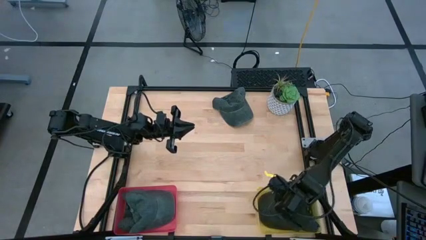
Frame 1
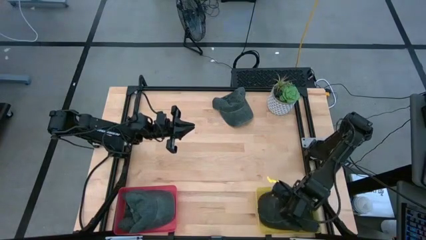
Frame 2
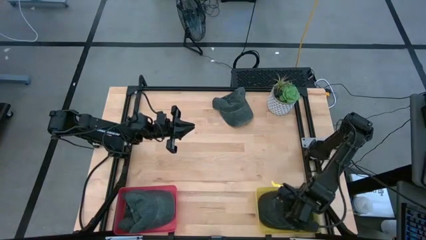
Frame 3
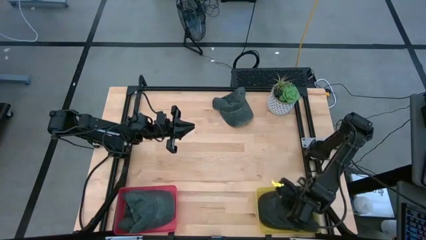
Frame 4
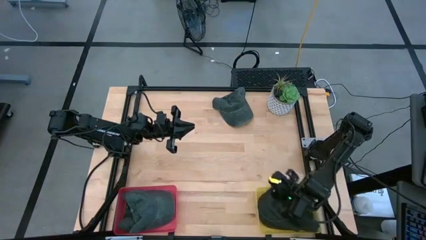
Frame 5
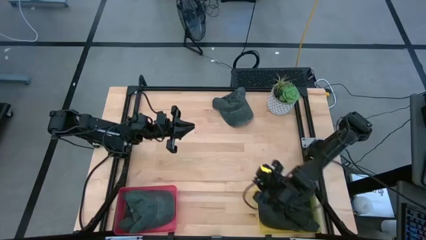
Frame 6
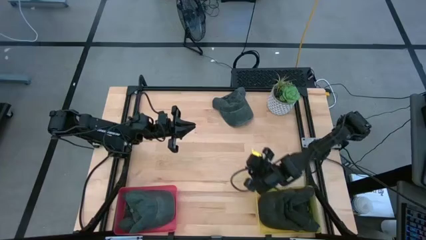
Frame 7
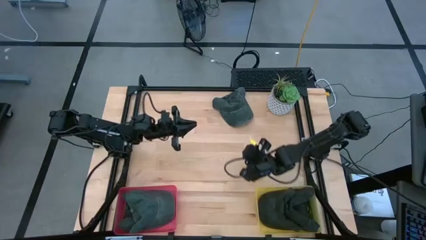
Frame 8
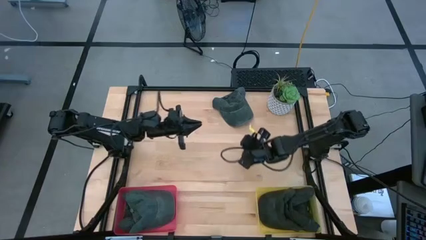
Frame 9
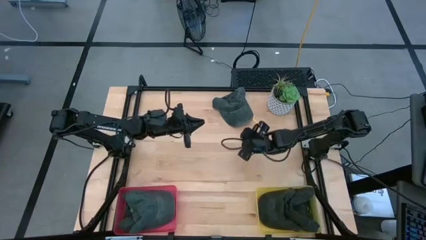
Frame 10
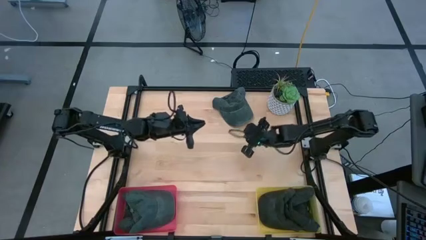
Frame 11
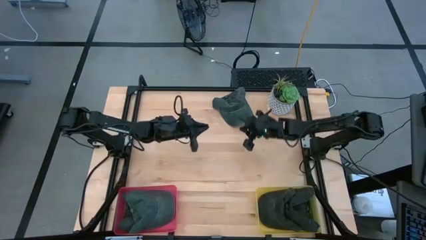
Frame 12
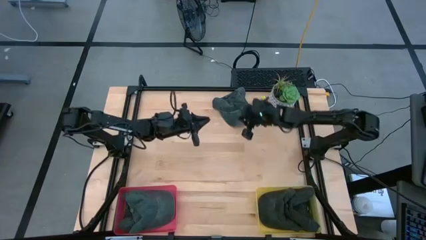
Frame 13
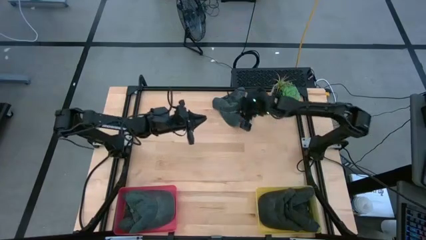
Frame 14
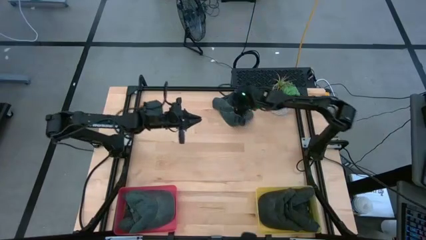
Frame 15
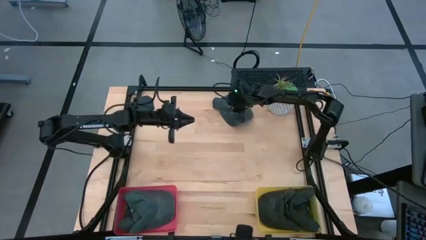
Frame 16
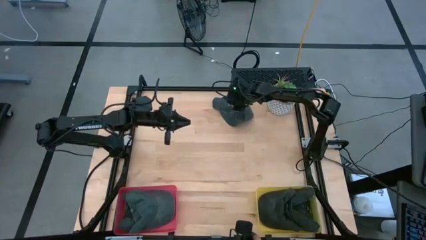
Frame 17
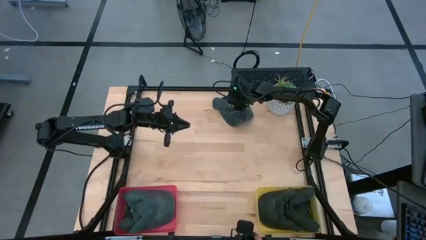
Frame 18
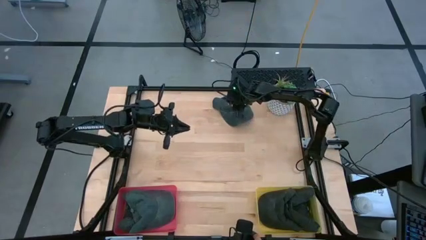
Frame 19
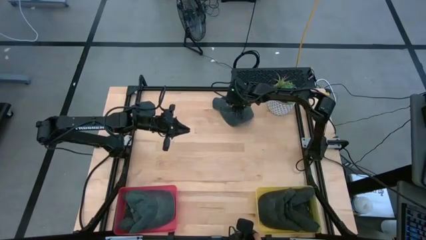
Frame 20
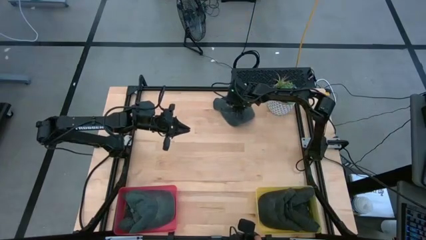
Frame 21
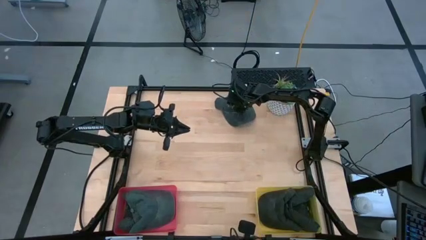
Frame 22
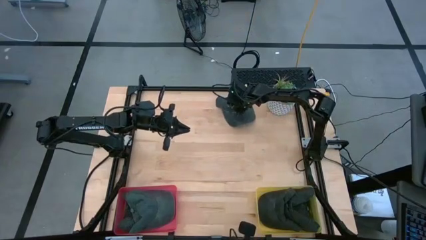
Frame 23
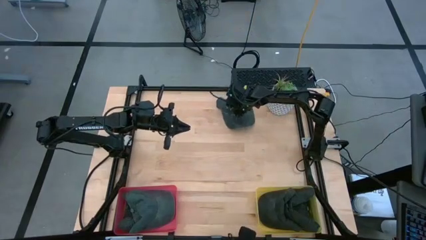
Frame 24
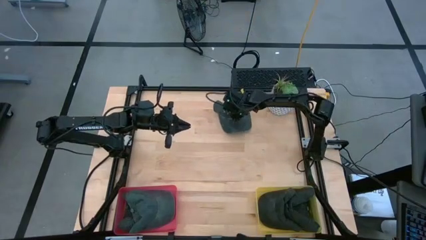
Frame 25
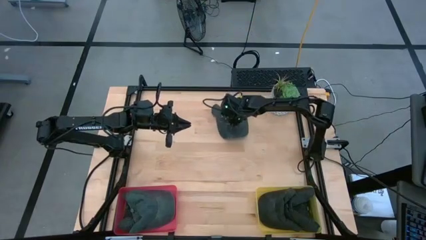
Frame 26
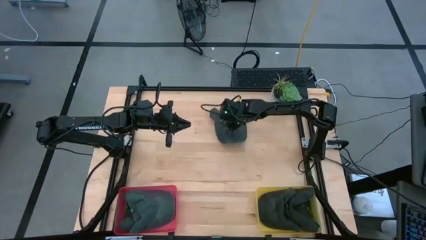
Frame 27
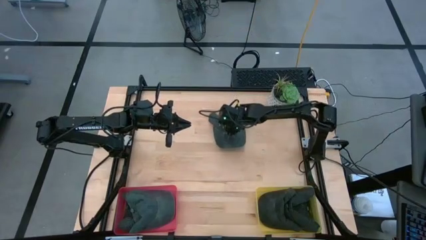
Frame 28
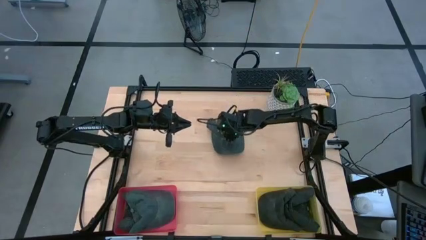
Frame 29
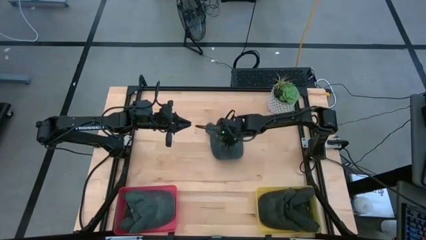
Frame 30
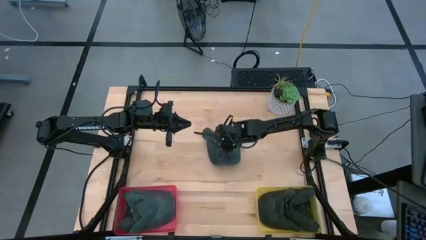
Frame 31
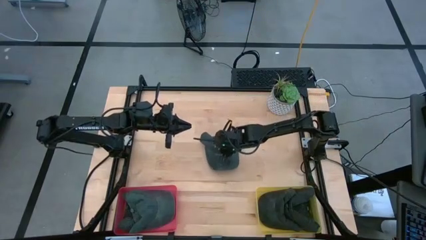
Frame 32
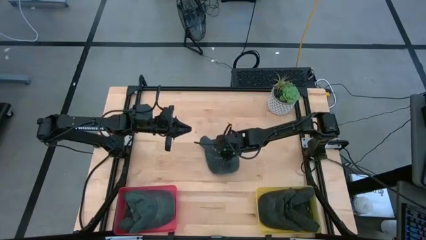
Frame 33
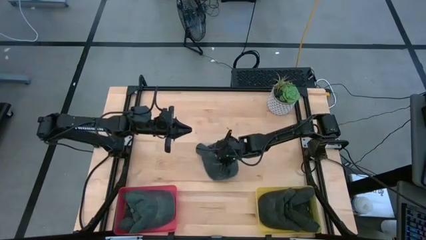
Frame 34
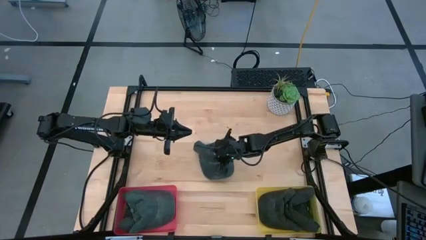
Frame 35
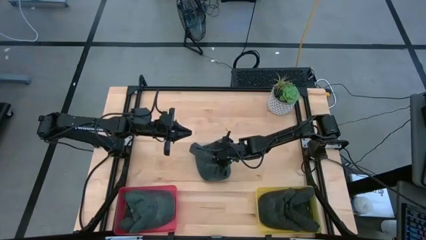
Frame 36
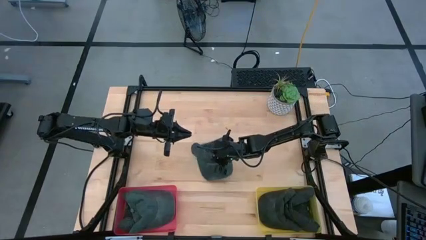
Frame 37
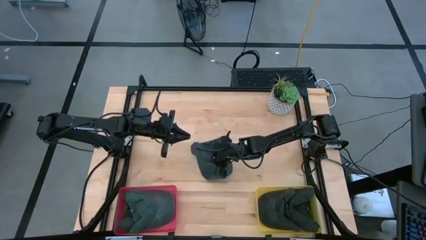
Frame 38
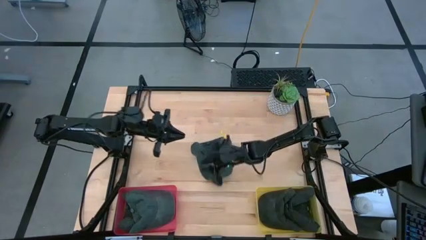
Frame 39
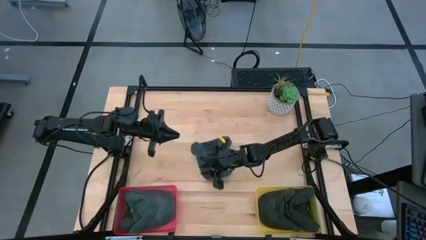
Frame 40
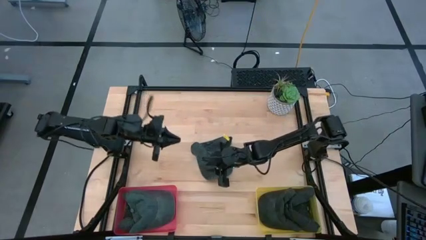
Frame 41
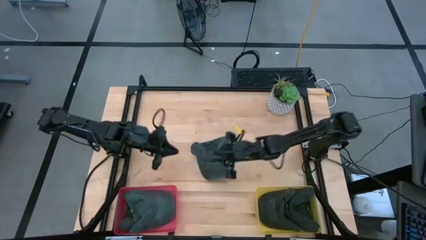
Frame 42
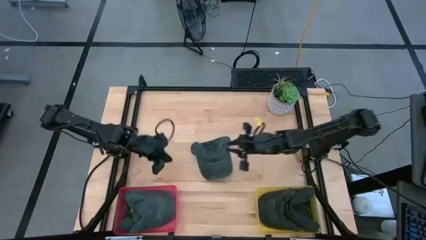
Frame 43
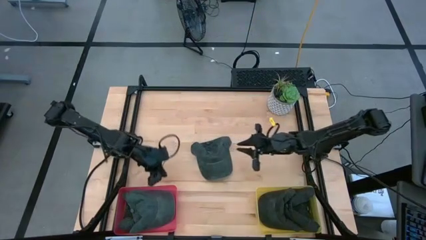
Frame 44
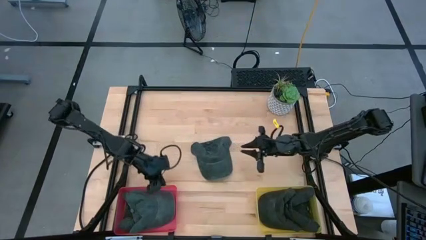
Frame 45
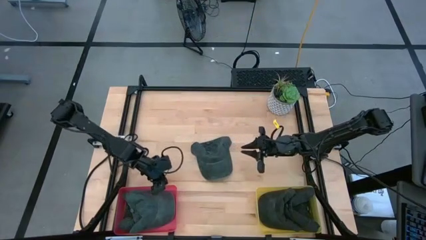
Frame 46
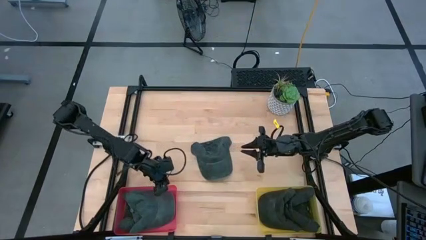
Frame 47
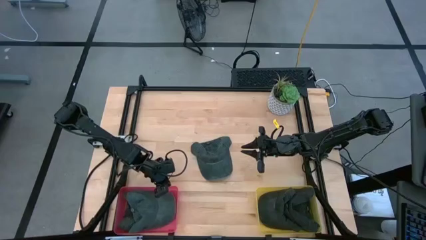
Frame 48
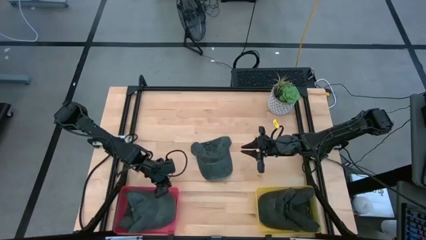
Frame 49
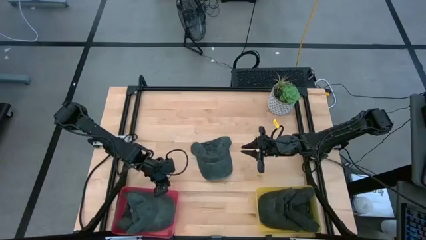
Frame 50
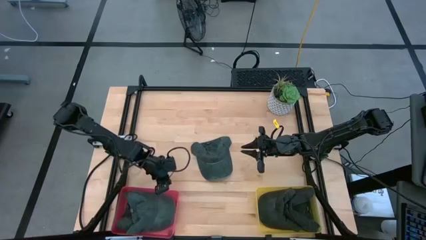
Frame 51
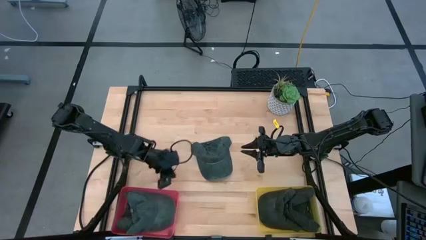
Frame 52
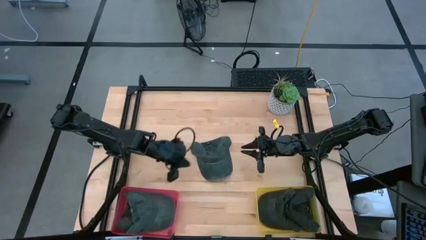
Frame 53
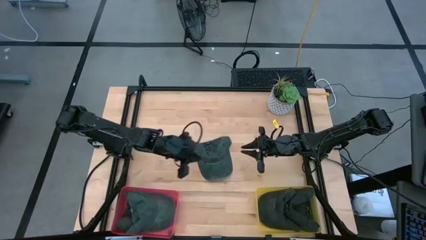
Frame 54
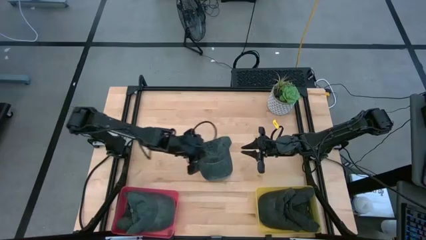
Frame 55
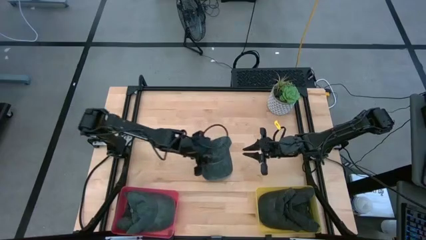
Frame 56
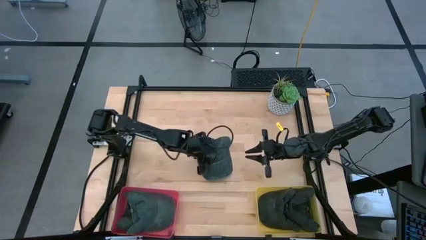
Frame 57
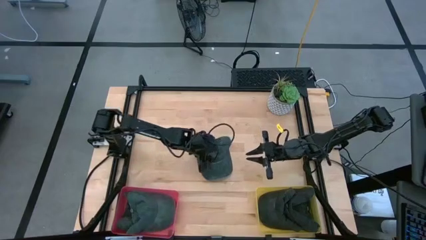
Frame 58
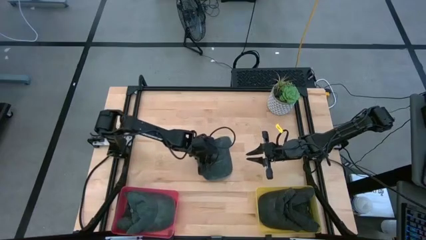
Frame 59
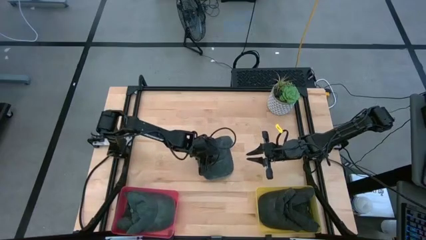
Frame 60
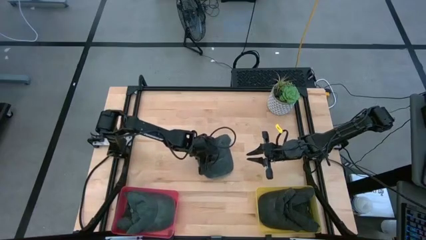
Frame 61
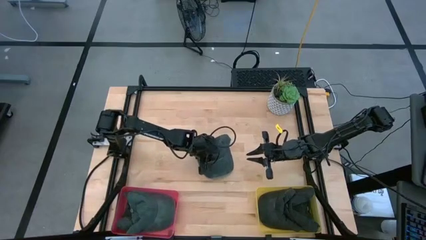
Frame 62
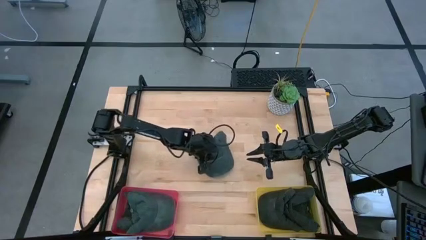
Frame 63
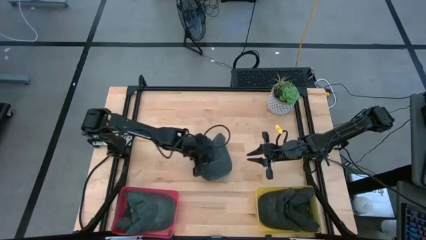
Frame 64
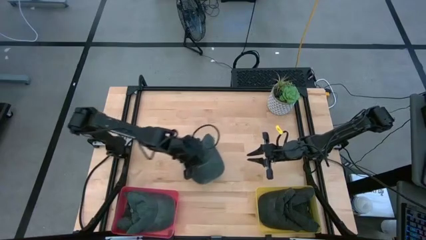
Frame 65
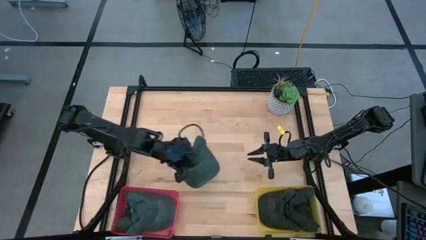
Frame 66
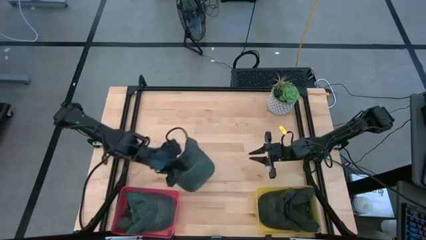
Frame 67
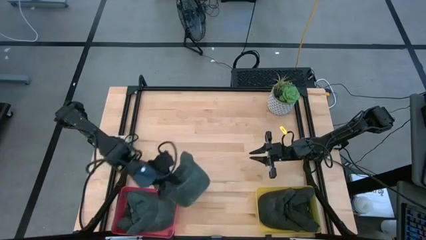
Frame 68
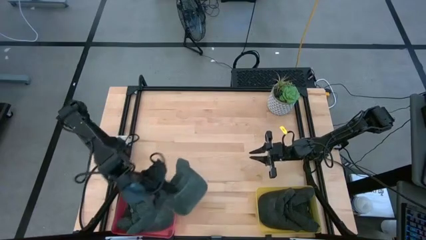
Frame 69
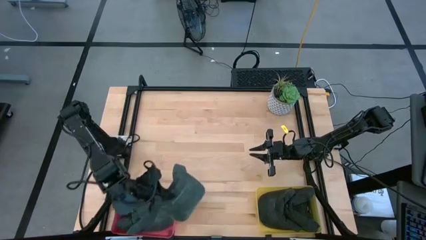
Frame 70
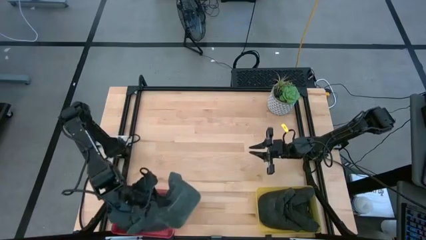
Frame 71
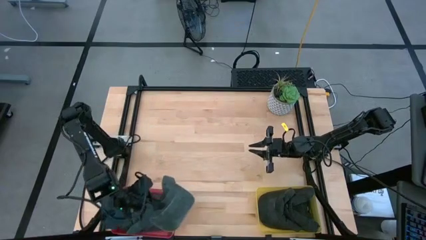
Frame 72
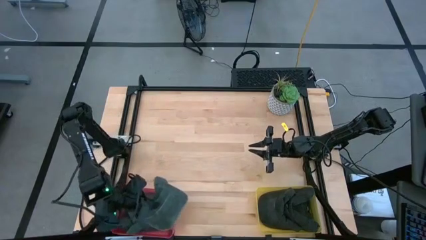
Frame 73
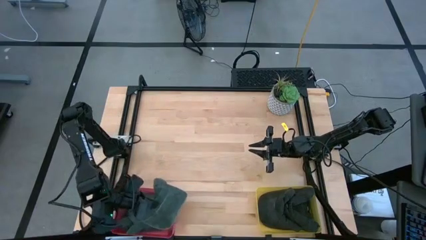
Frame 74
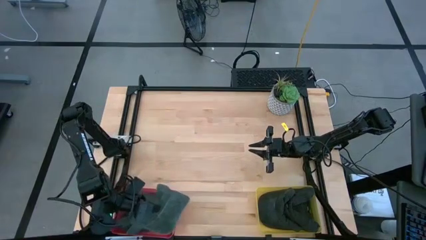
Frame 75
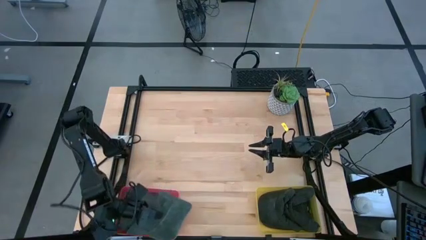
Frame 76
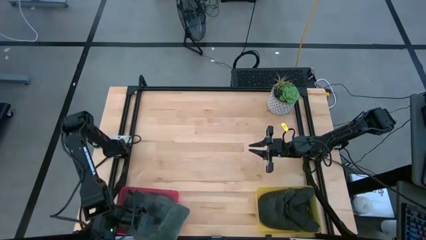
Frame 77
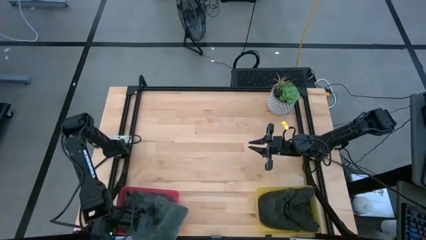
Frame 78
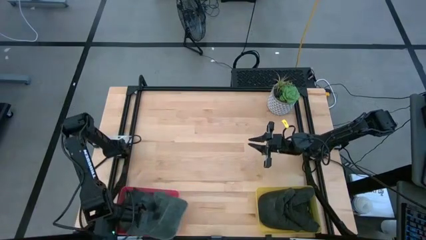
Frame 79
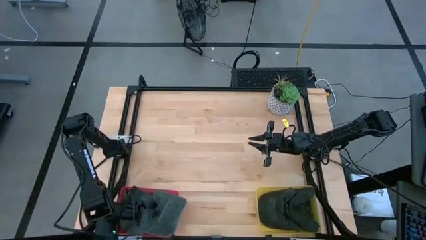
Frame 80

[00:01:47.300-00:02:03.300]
Task: Pick & Place hat
Put the grey cap into the pink bin

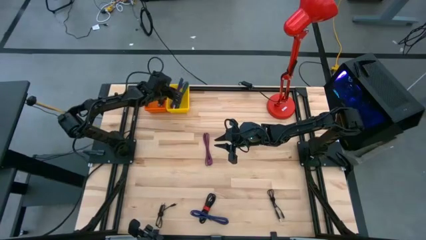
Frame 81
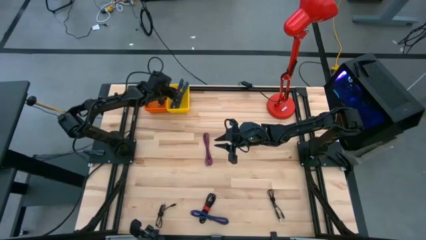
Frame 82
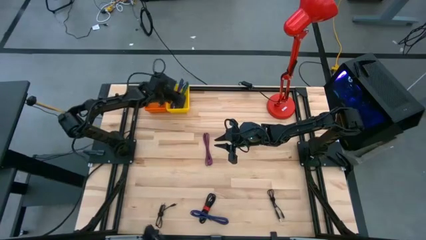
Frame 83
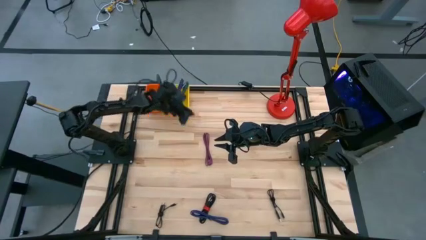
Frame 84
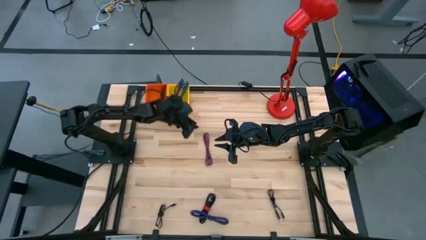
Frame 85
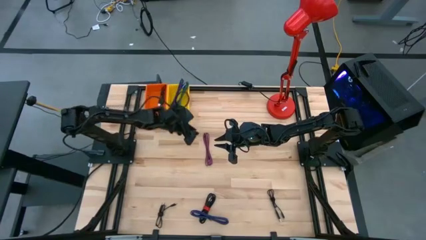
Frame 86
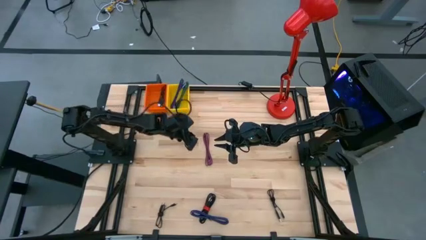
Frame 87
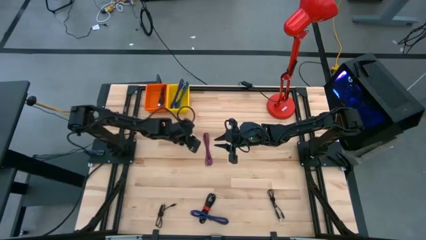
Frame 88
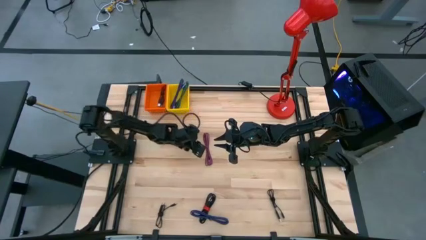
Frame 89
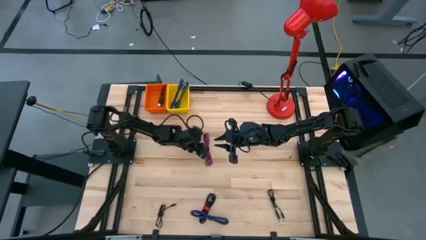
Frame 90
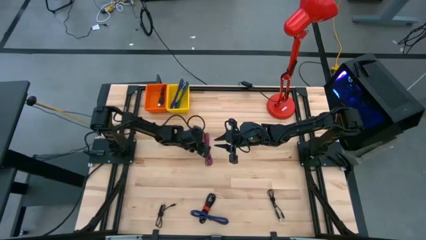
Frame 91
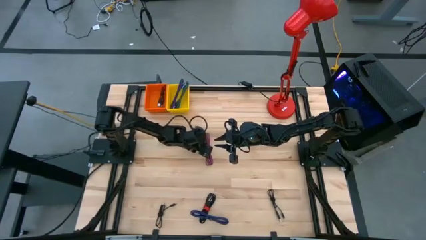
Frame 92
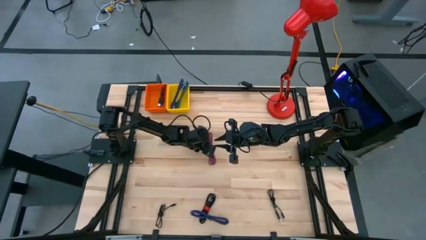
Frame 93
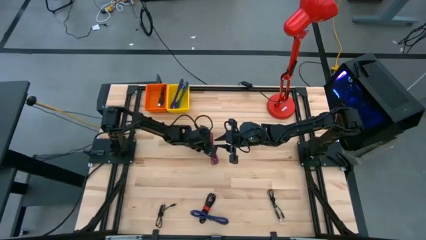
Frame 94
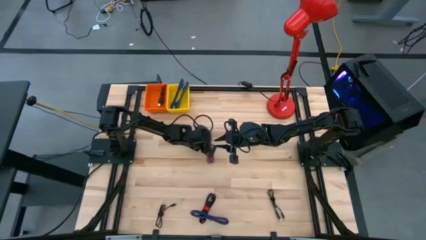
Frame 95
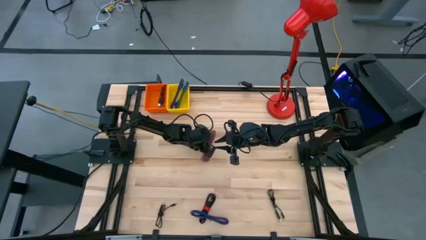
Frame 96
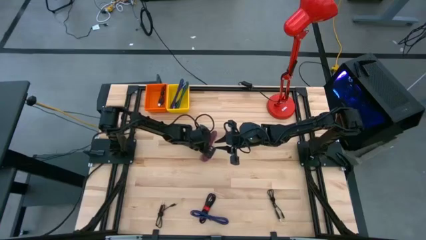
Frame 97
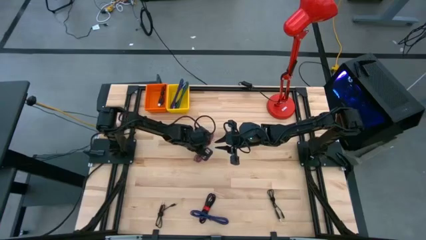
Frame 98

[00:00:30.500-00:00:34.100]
Task: Pick & Place USB Port
Put the black and pink USB cable into the yellow bin
